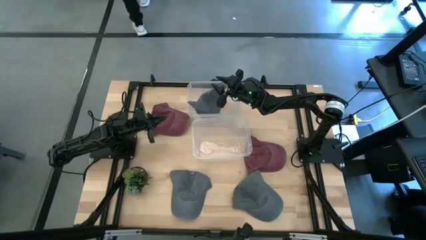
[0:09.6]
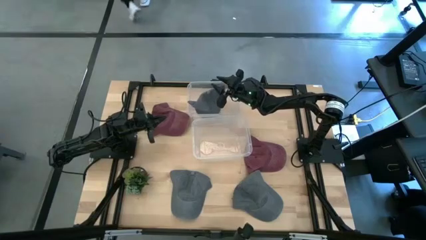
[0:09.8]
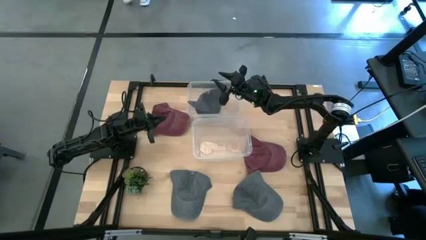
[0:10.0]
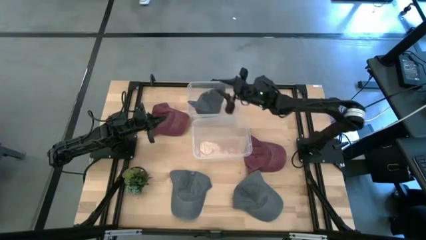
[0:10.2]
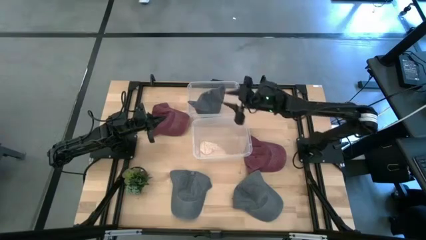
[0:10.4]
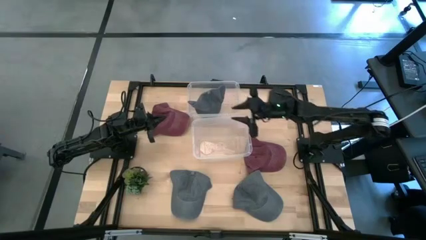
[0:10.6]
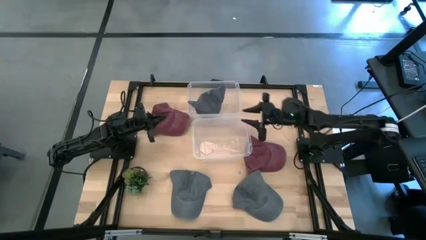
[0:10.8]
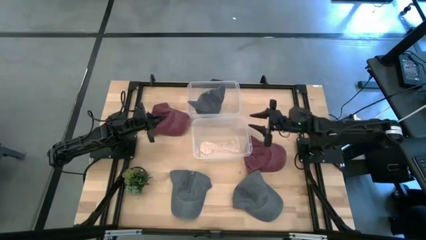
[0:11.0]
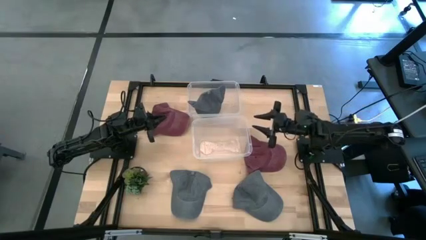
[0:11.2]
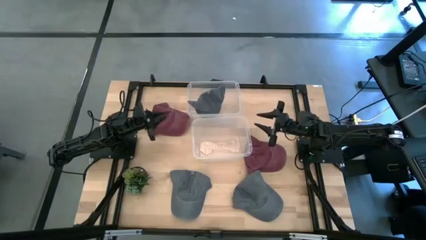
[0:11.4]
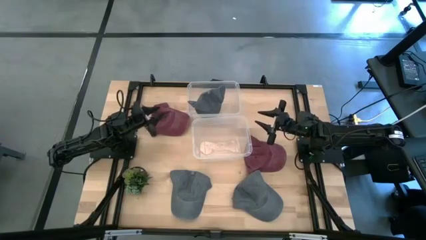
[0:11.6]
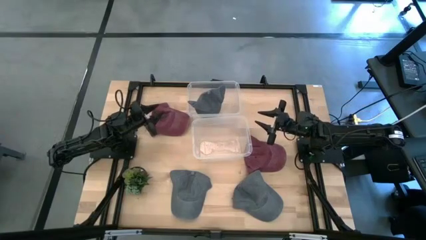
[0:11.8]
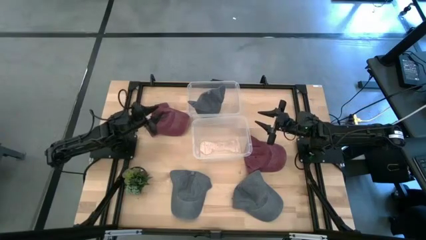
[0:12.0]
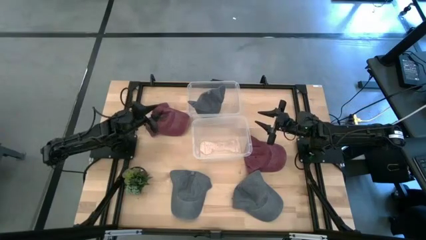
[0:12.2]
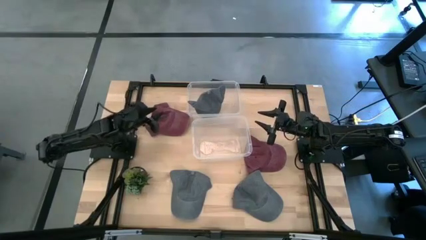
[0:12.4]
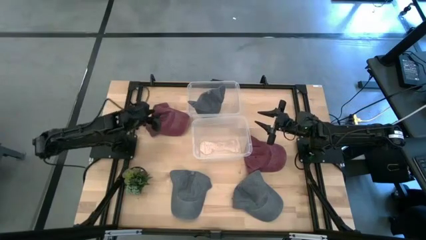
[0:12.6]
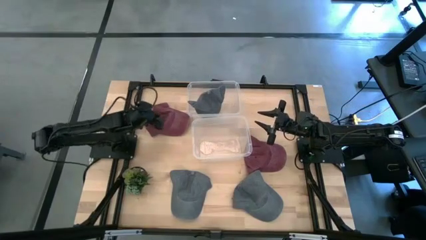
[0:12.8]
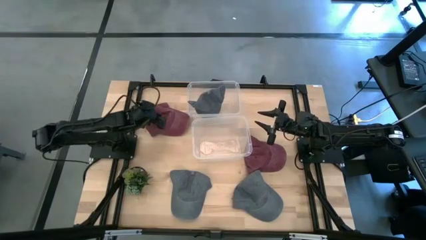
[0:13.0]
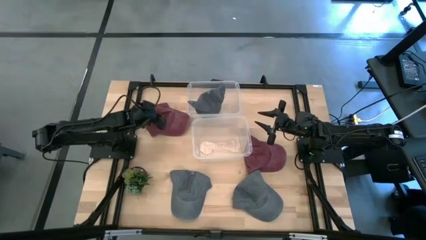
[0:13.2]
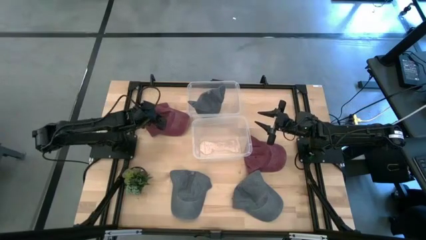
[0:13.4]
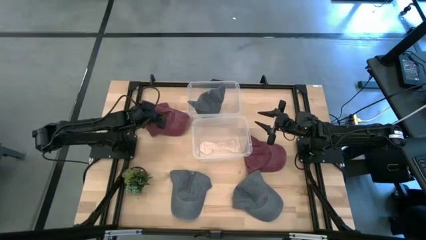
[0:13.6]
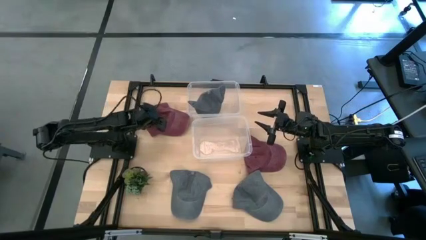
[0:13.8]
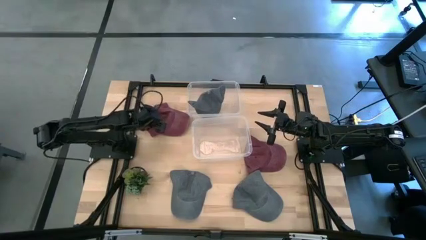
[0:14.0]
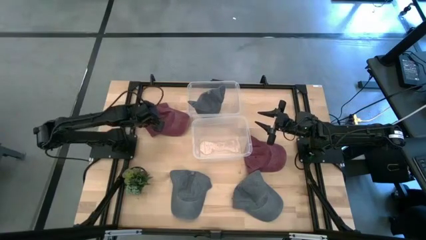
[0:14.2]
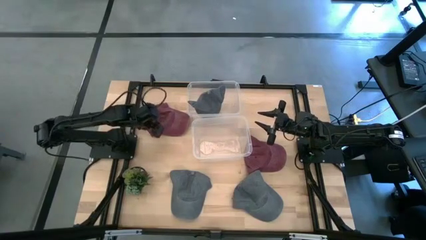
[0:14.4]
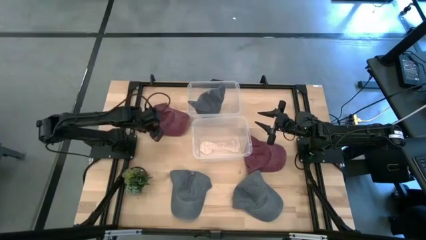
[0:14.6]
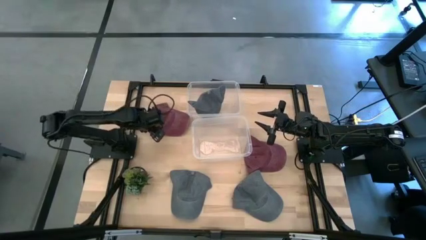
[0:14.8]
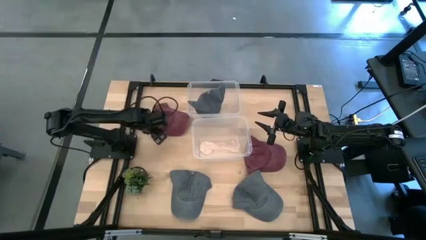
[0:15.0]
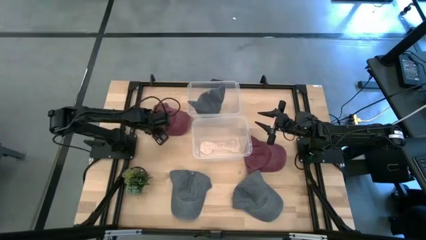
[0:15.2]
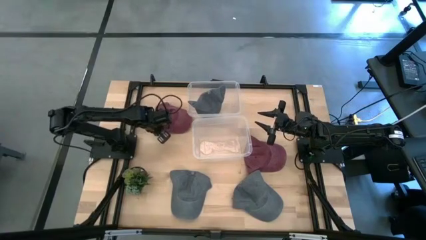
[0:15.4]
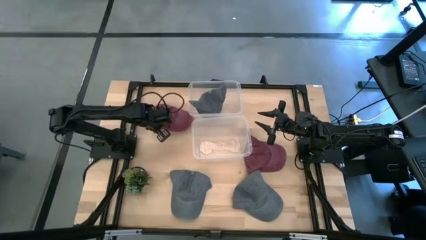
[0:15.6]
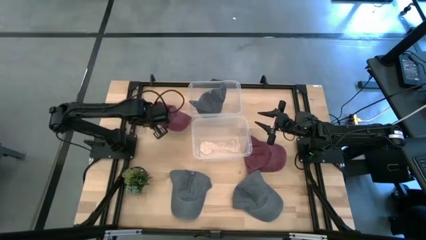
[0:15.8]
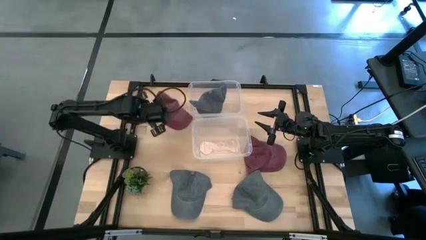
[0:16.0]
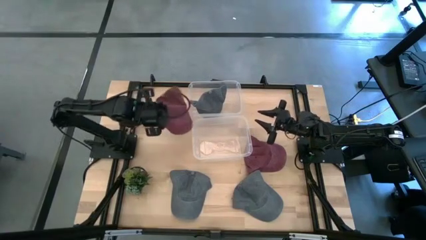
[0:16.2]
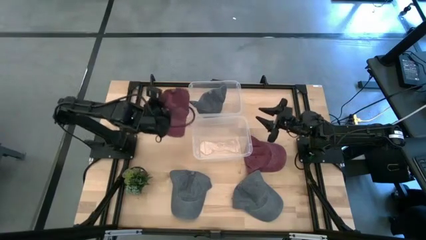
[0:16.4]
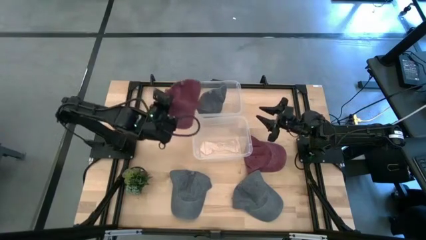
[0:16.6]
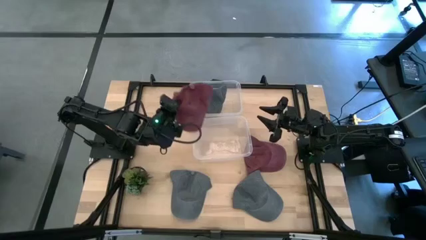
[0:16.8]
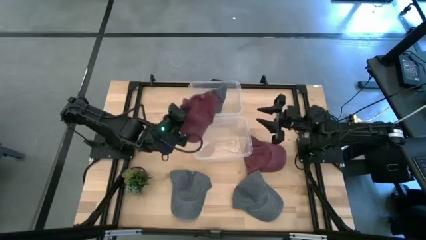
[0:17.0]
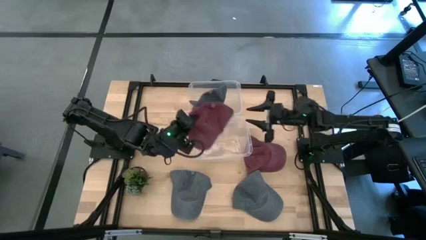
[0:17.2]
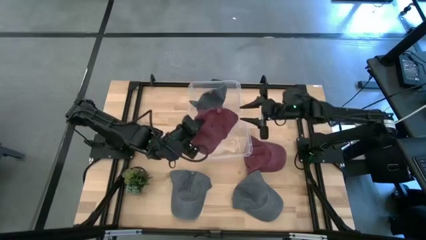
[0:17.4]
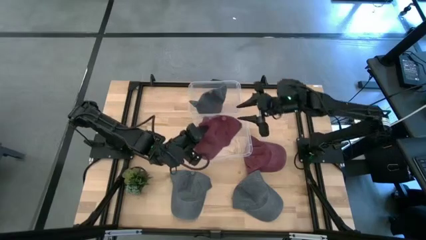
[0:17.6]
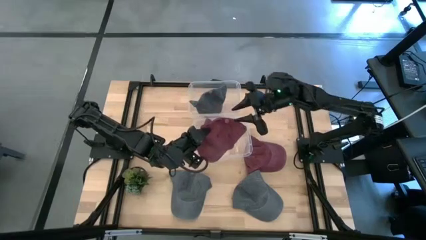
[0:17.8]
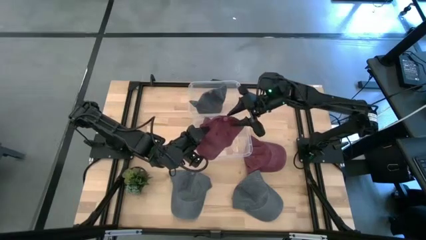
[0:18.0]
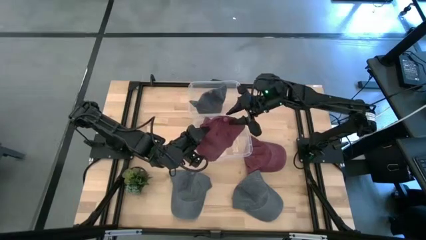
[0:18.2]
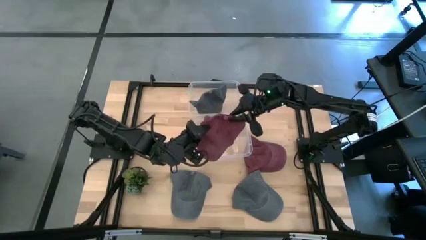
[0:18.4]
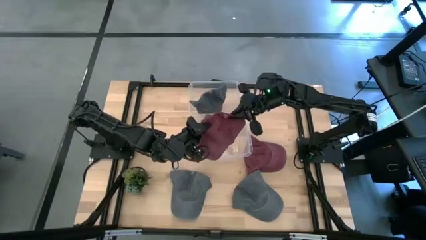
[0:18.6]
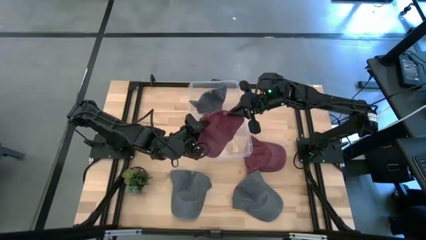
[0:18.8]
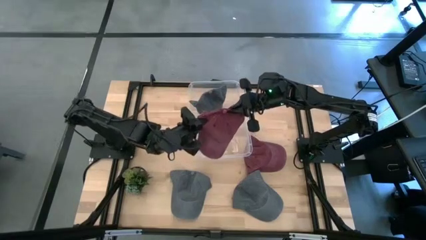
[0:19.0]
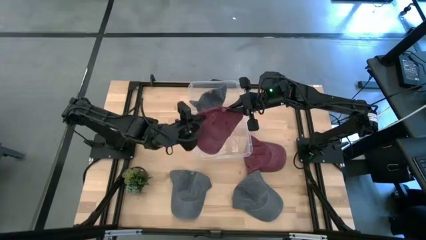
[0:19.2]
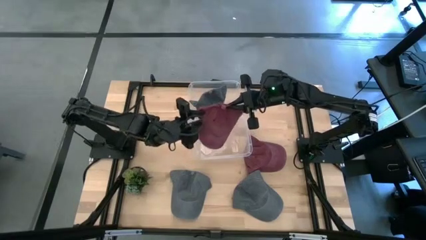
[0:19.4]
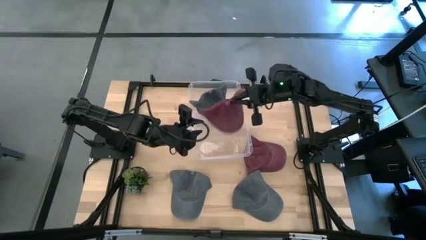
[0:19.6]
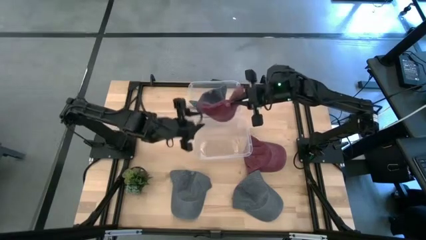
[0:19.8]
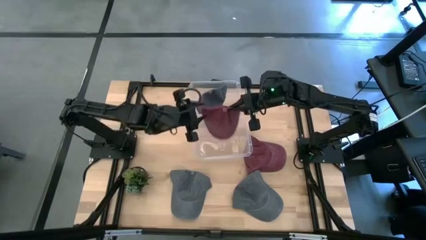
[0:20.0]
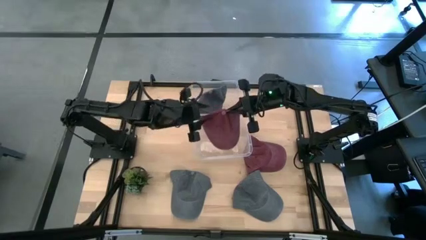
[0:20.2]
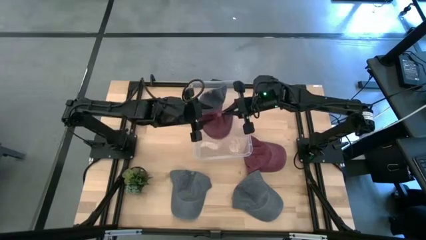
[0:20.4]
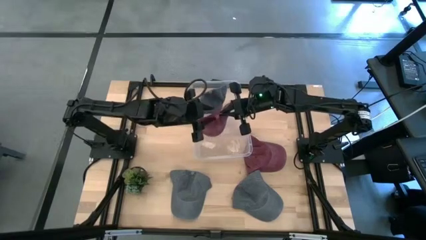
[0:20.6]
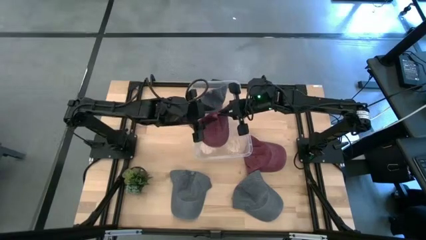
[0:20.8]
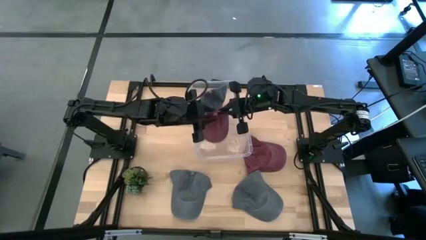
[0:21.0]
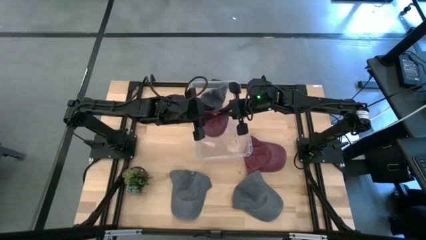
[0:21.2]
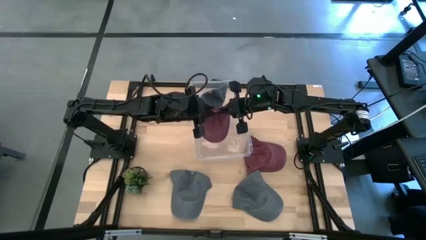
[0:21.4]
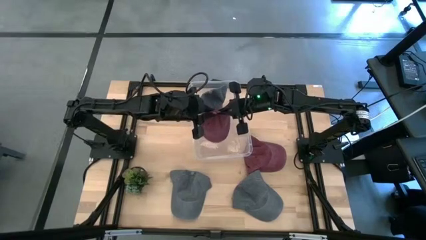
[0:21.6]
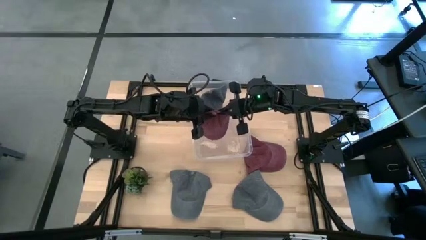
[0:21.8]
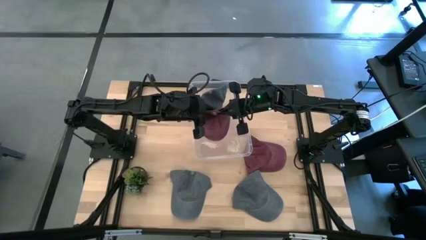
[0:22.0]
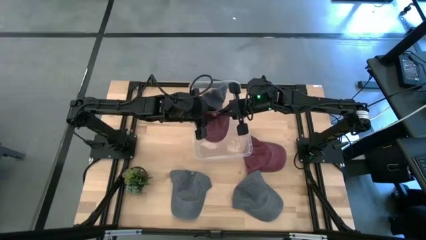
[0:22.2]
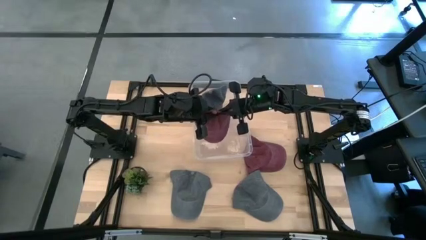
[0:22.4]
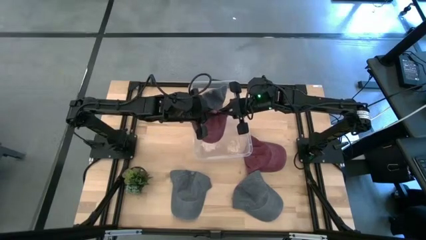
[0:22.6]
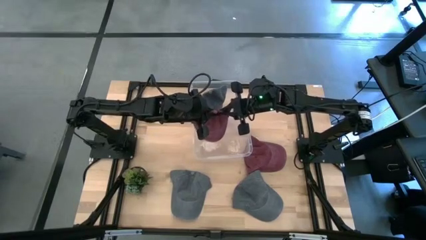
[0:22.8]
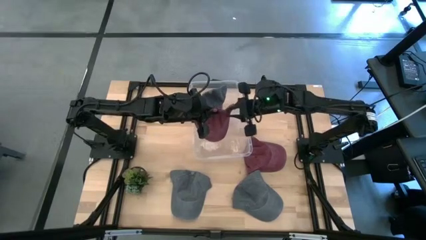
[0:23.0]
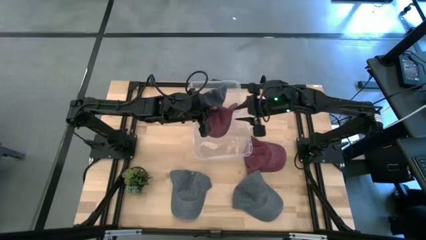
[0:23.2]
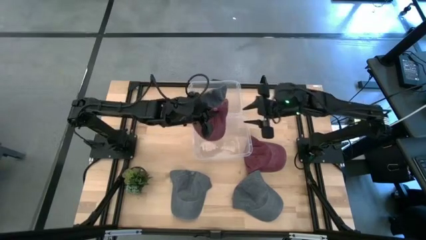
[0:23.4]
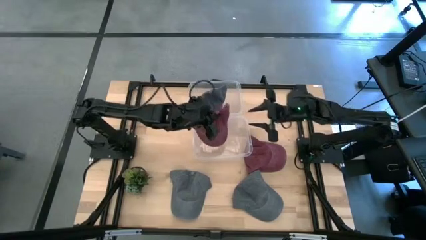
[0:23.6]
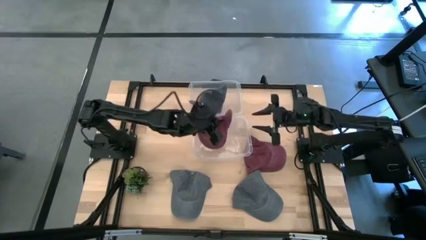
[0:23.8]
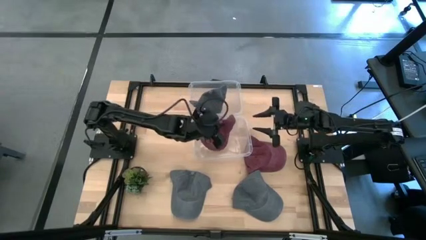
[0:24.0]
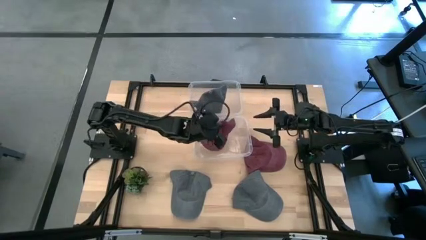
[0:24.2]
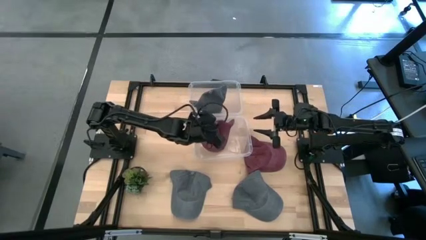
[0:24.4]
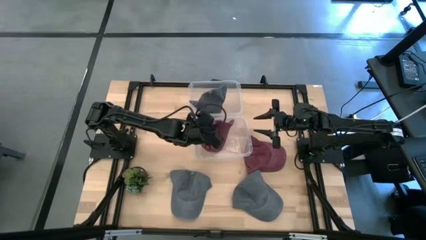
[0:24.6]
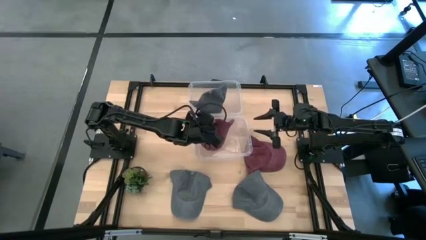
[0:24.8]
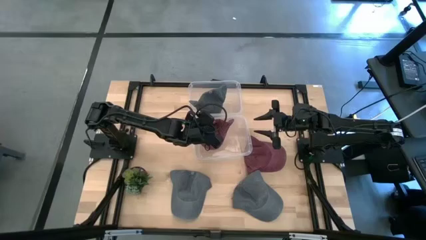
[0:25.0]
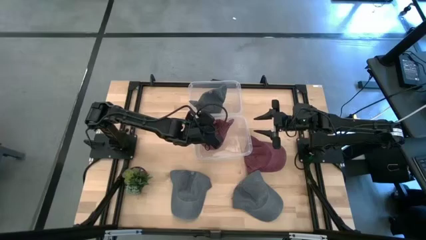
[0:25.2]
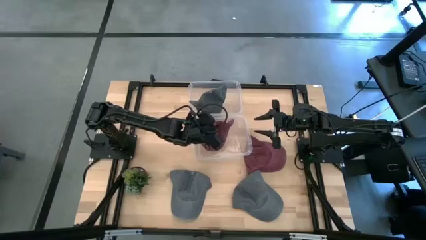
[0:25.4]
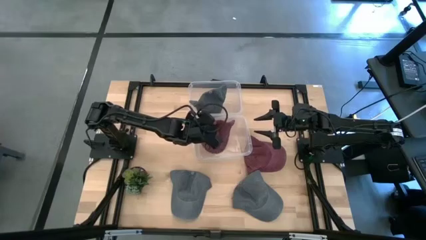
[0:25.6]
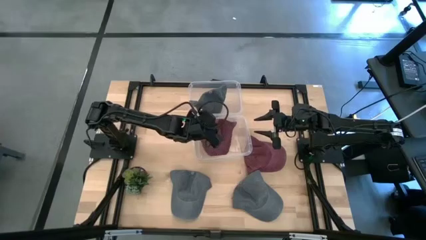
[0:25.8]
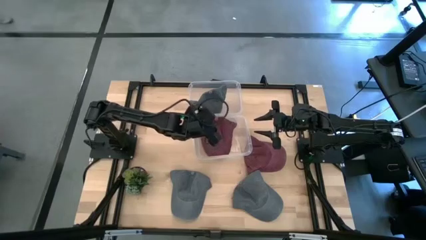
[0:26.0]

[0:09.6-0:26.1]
Task: Pick & Place hat
Put the left red cap into the bottom transparent bin
